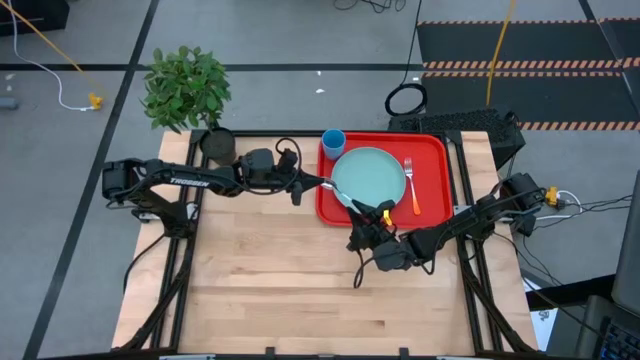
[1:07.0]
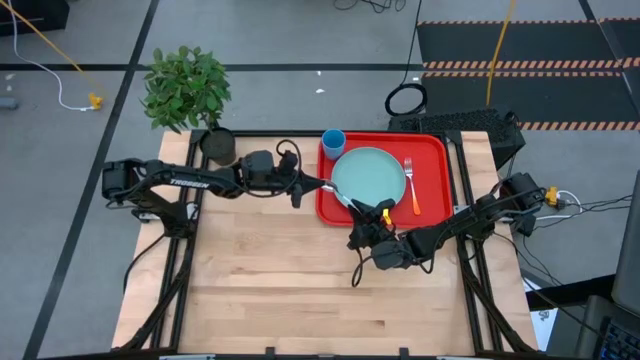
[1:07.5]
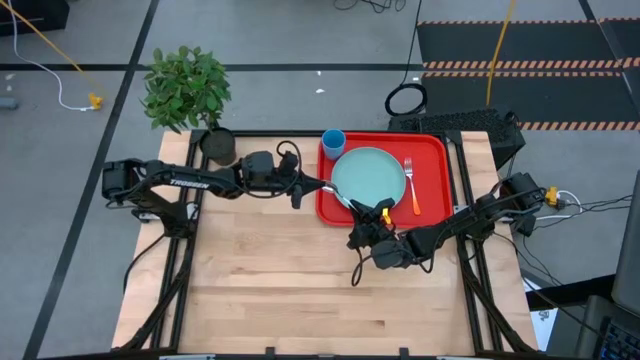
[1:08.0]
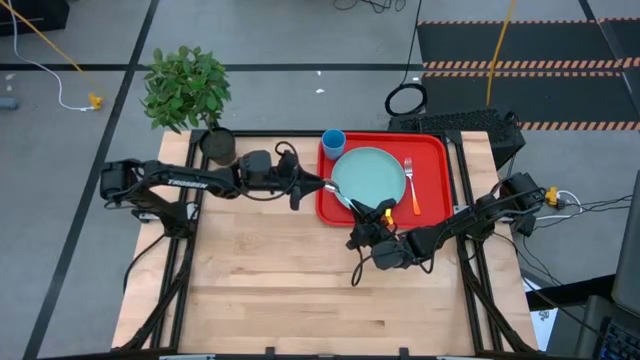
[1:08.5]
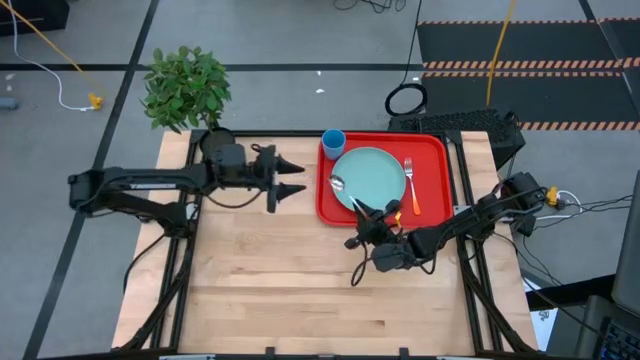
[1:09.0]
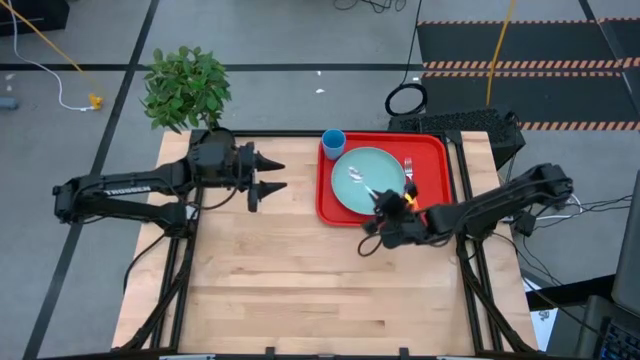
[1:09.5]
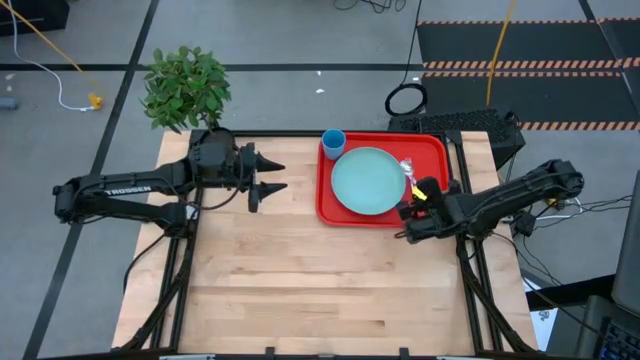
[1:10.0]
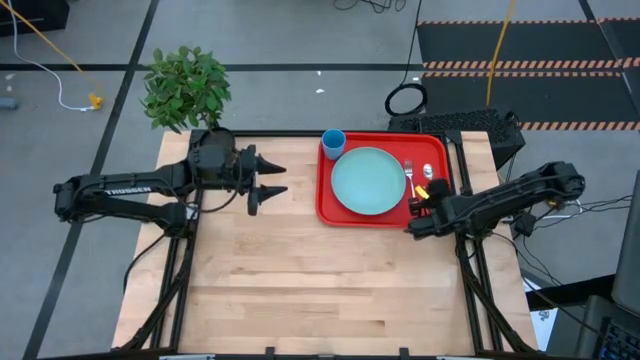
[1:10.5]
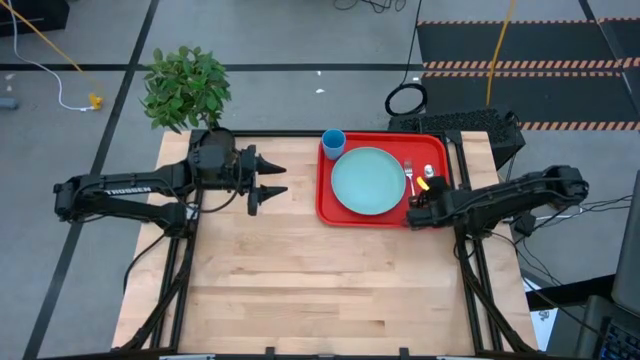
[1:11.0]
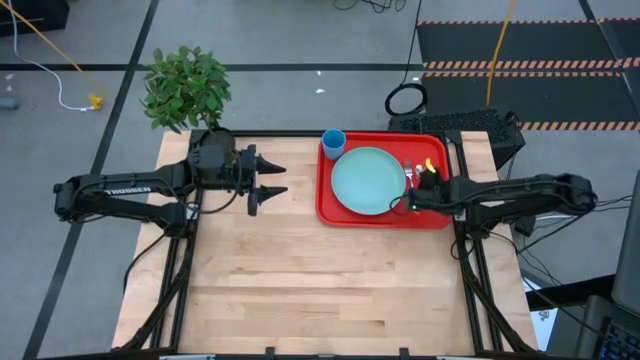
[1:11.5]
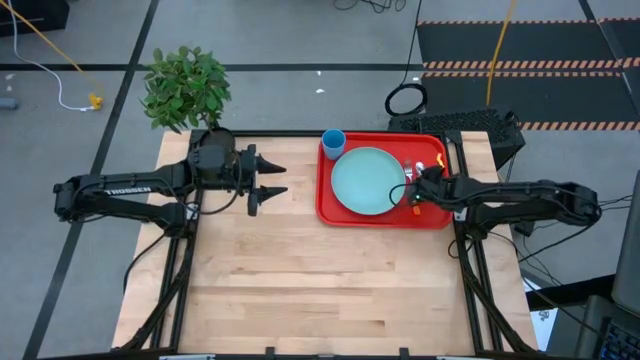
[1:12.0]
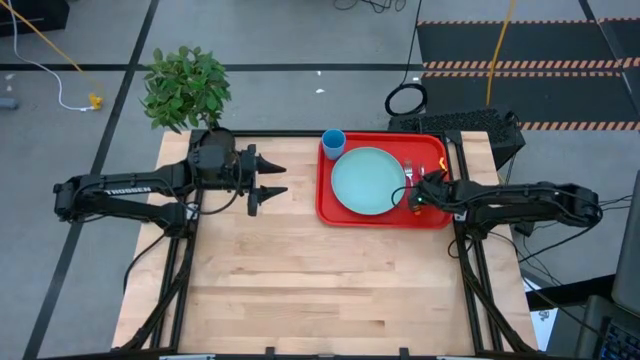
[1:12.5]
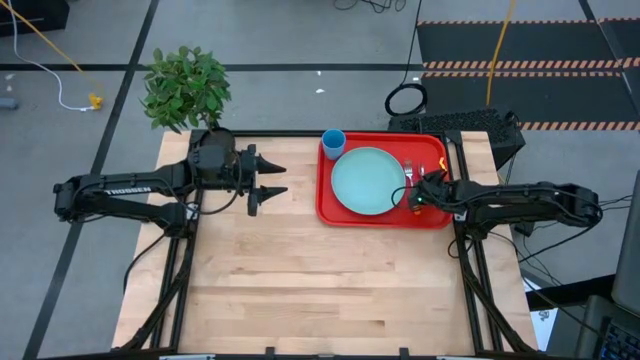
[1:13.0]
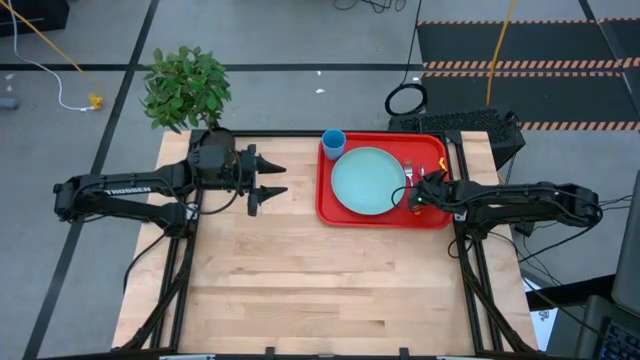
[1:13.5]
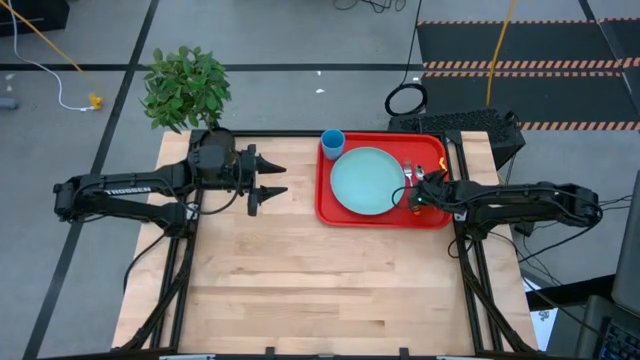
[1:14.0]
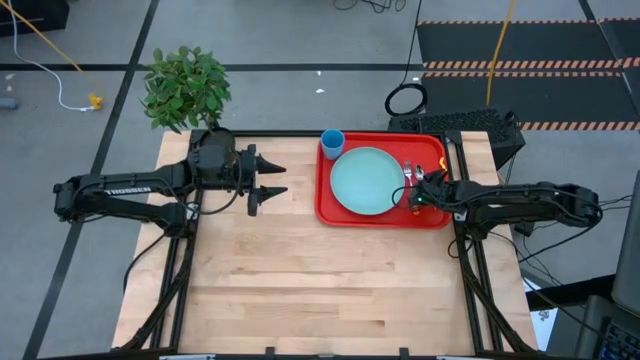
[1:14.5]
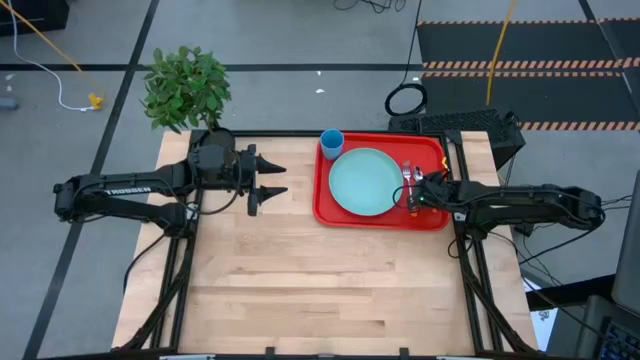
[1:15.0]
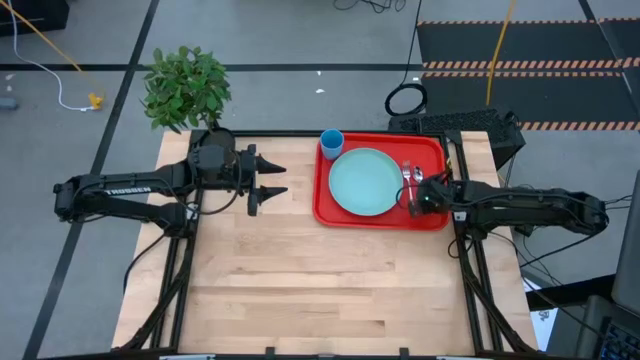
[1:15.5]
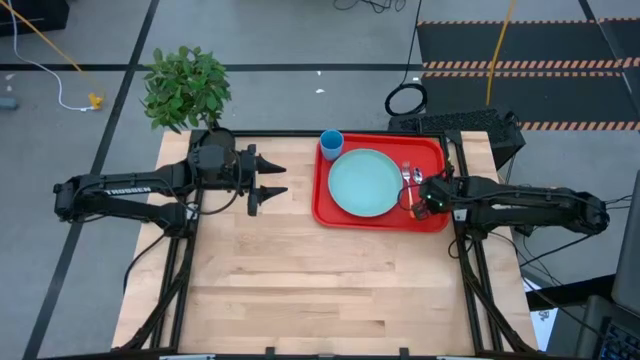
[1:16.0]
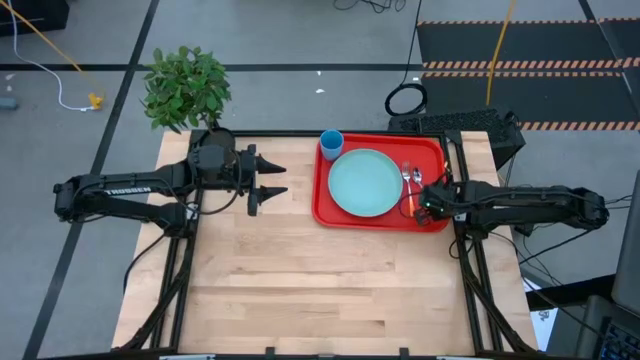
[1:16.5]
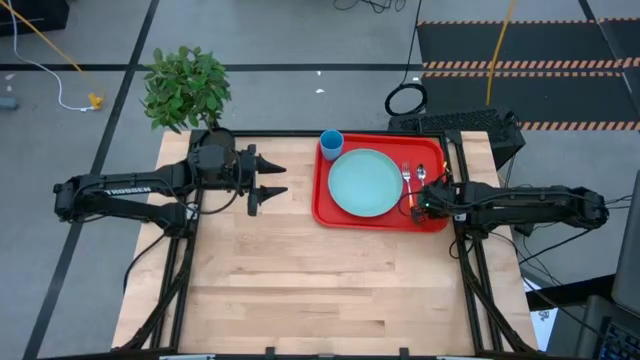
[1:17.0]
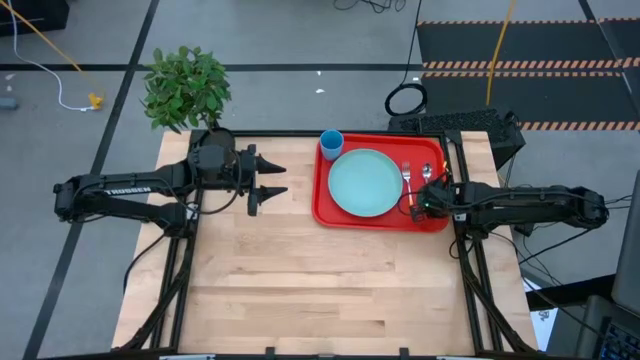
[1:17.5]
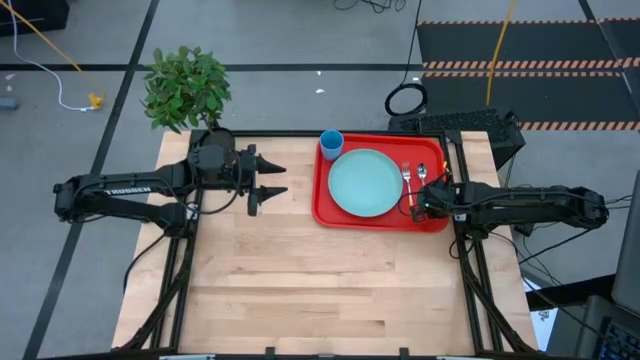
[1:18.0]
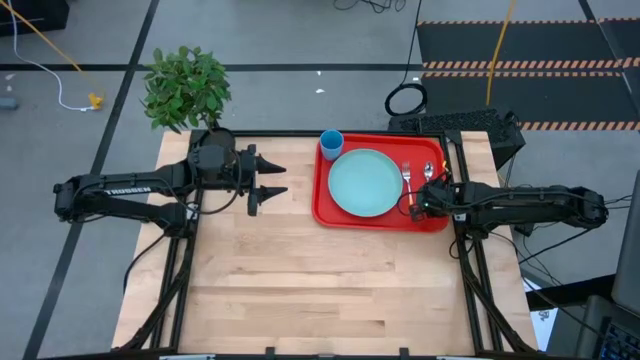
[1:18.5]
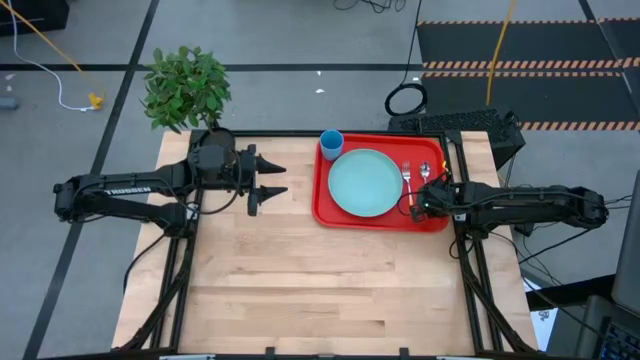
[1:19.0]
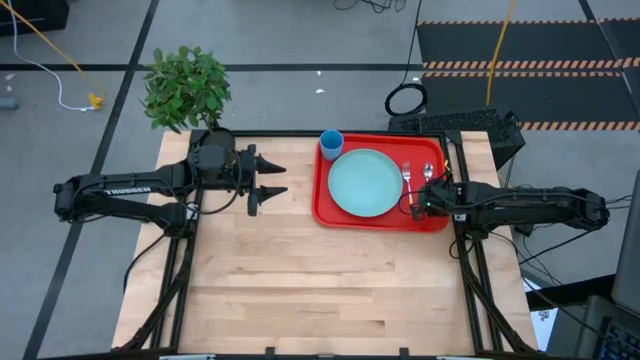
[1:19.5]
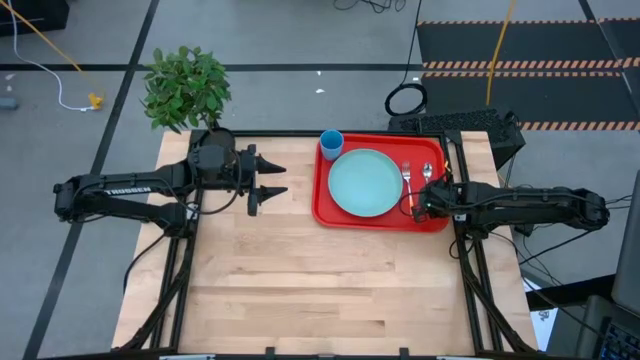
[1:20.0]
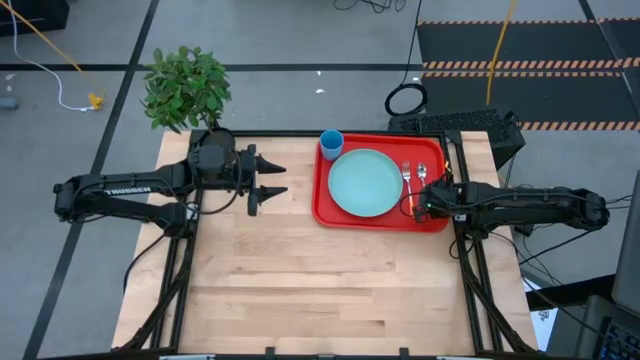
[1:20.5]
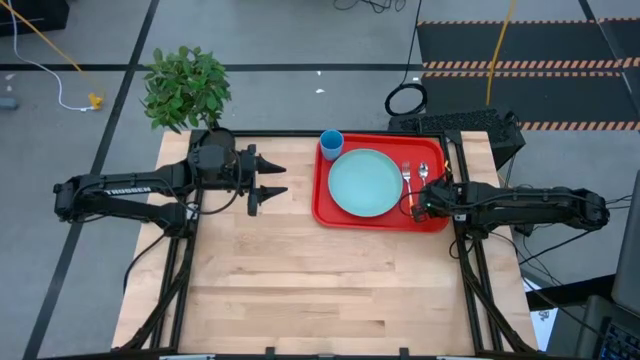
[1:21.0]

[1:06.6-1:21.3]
Task: Pick and place plate/cup/fork/spoon on tray
Put the orange spoon on the red tray to the right of the orange fork

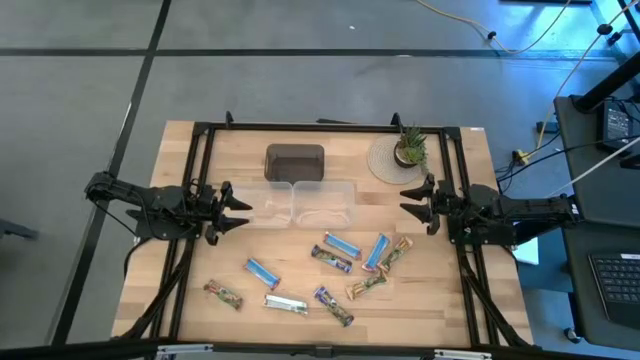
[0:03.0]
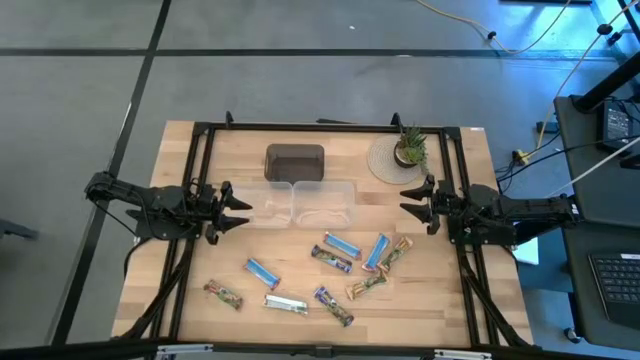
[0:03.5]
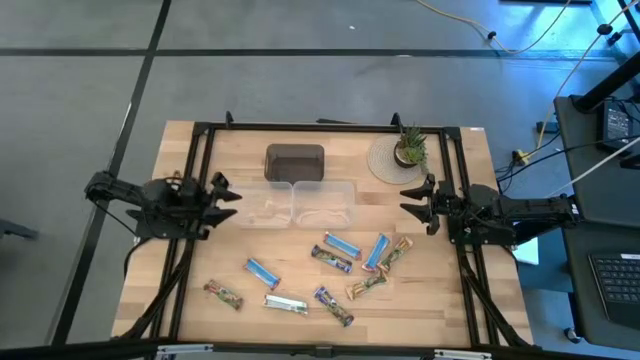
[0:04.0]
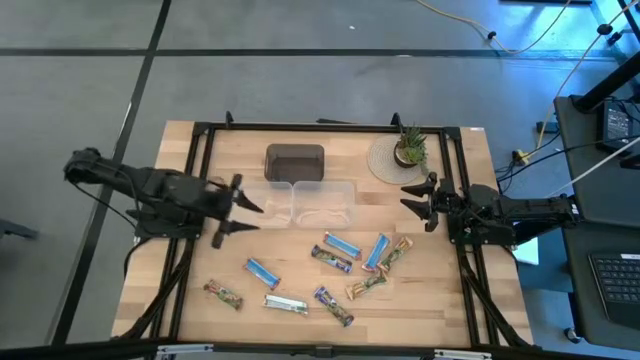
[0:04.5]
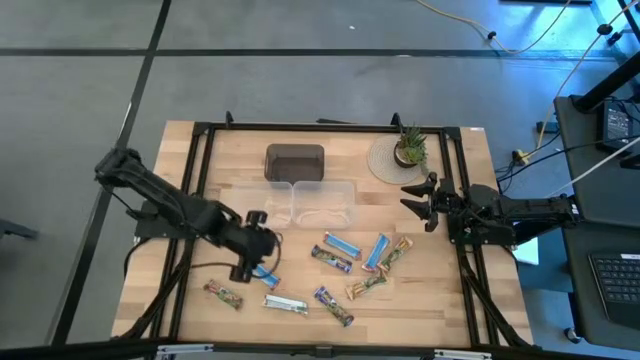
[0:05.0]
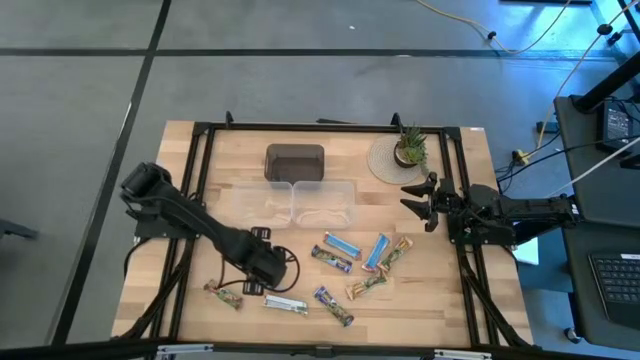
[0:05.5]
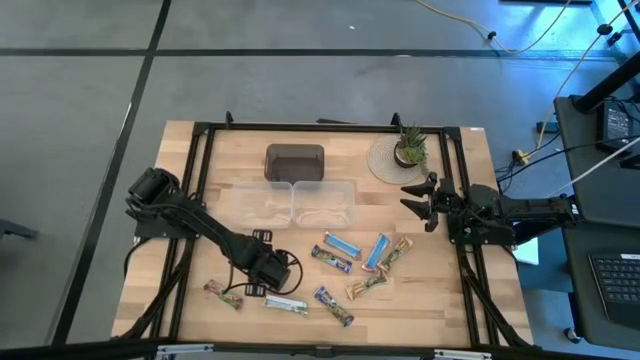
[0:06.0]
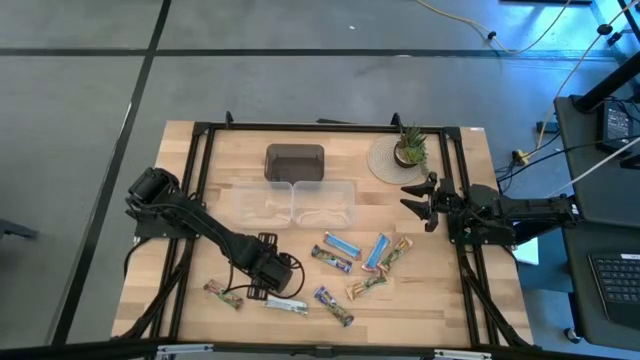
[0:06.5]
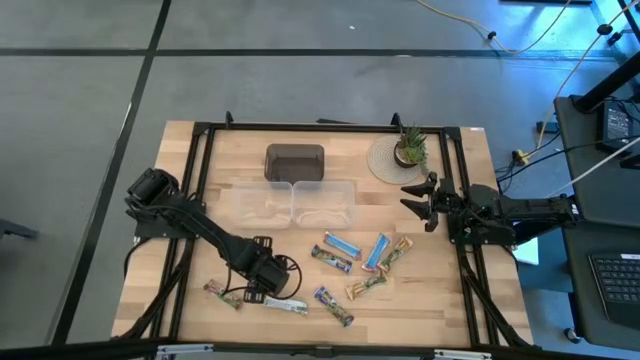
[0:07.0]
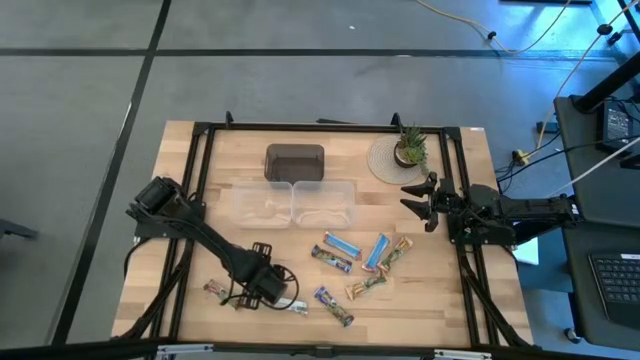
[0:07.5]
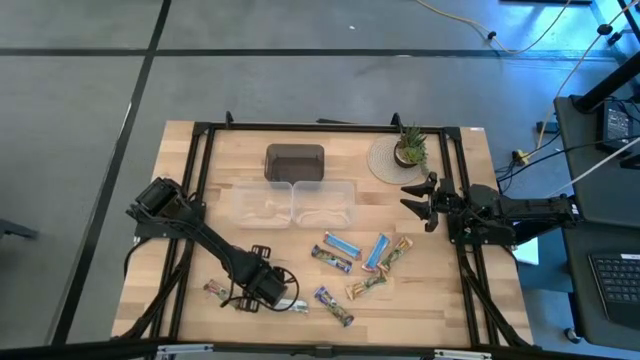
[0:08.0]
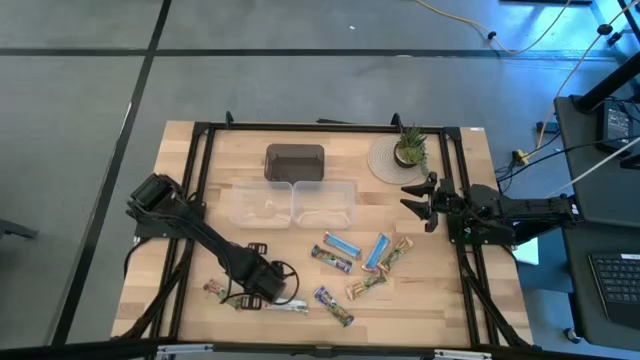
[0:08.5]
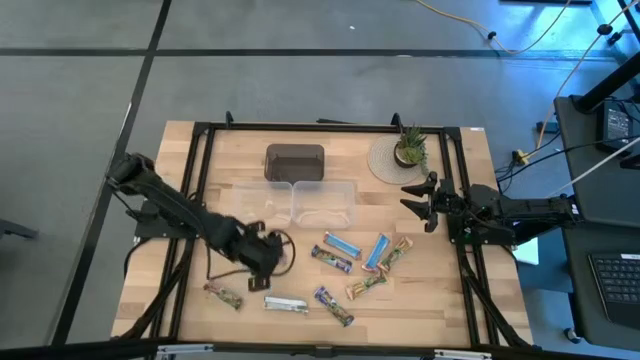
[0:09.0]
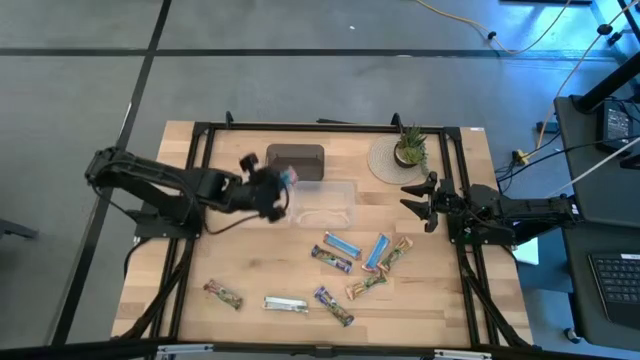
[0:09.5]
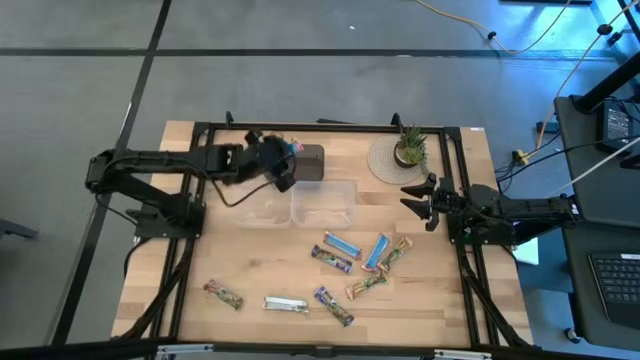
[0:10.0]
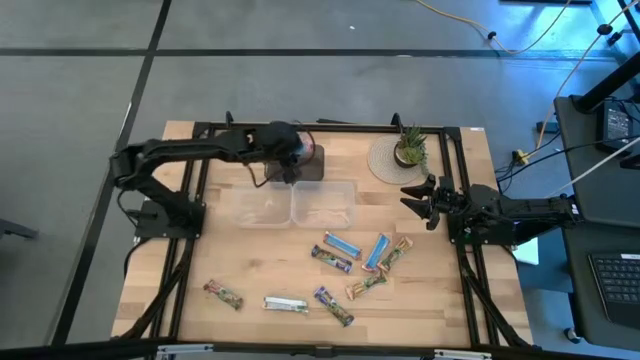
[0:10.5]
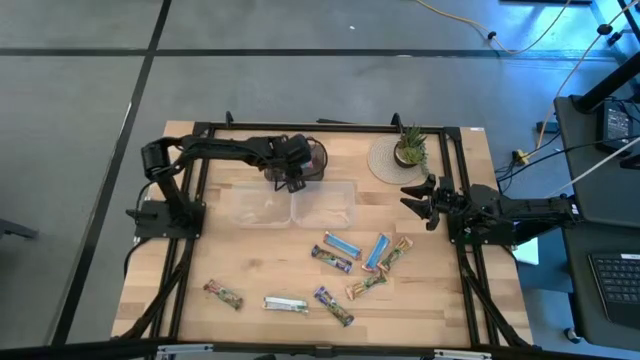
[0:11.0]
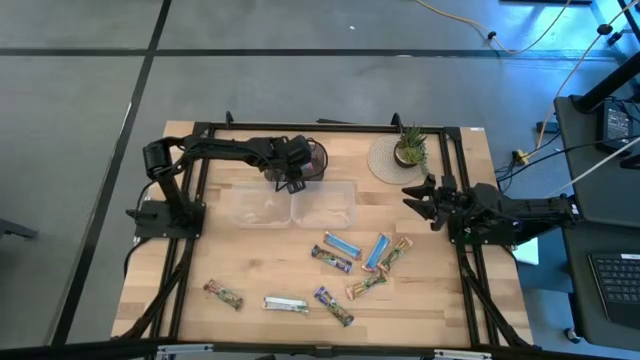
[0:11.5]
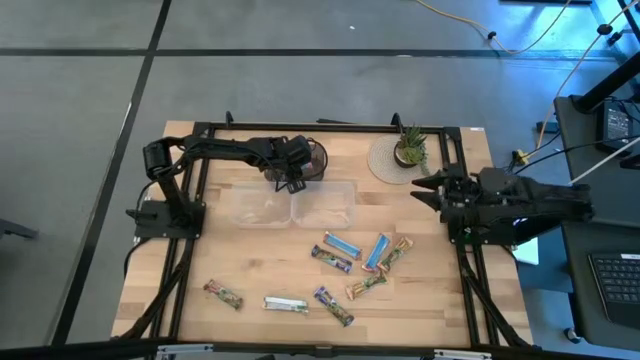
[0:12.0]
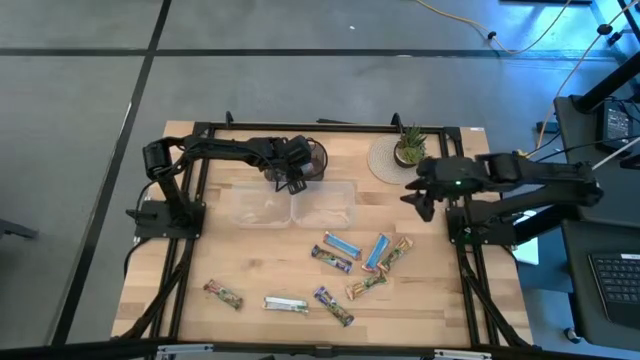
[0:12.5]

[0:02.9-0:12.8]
Task: Pick and place Granola Bars by type
Put the red granola bar into the black bin
